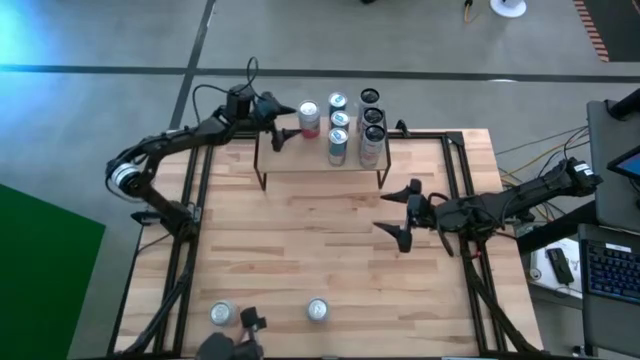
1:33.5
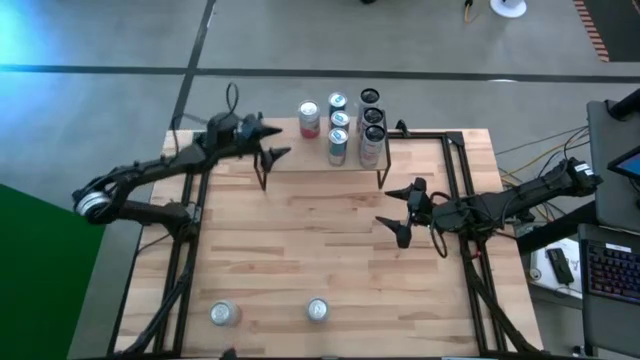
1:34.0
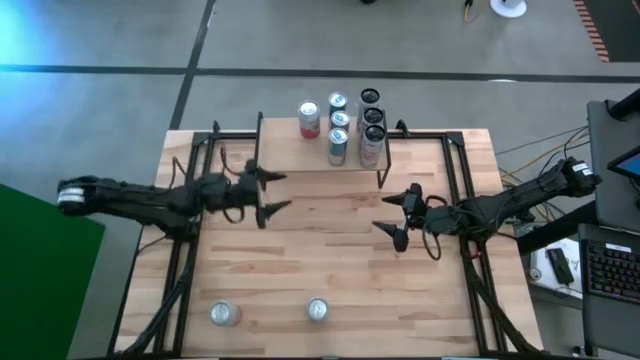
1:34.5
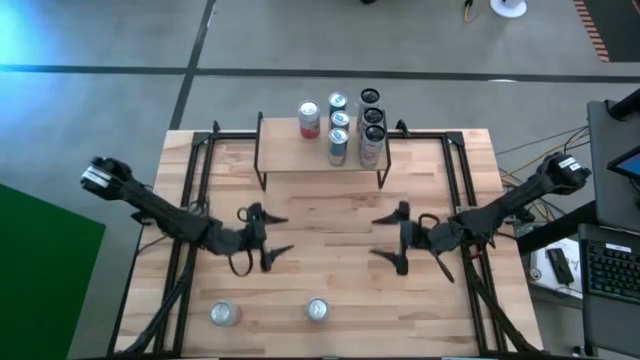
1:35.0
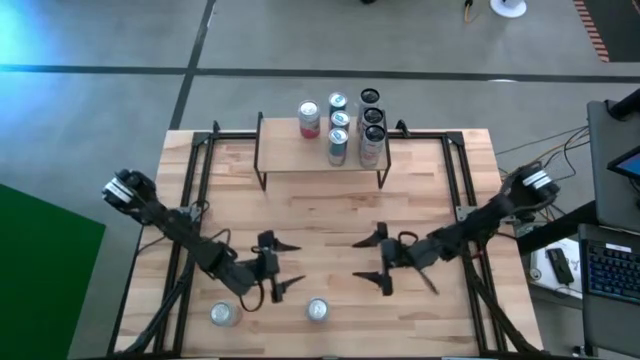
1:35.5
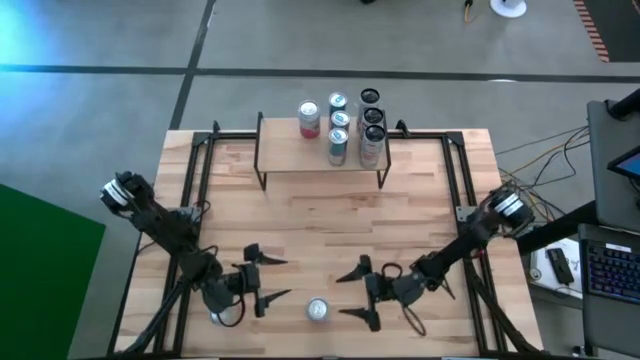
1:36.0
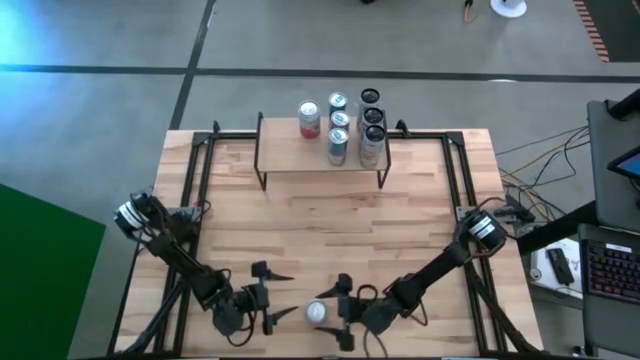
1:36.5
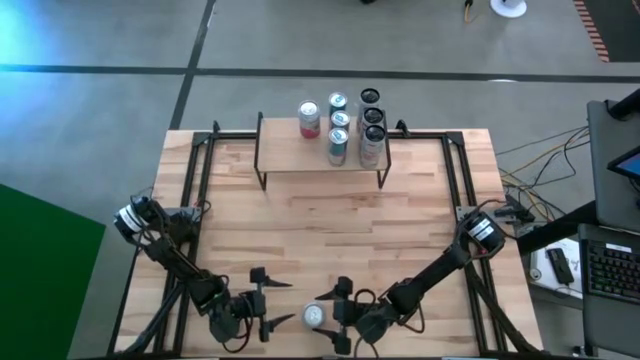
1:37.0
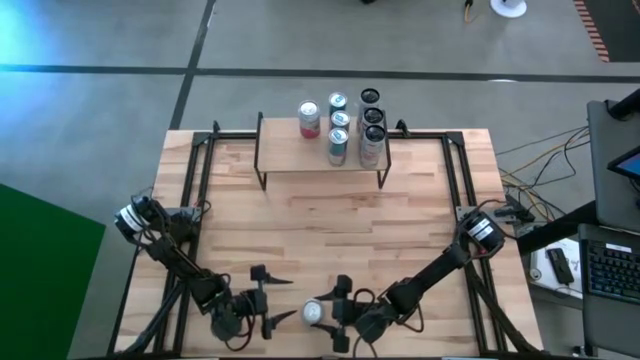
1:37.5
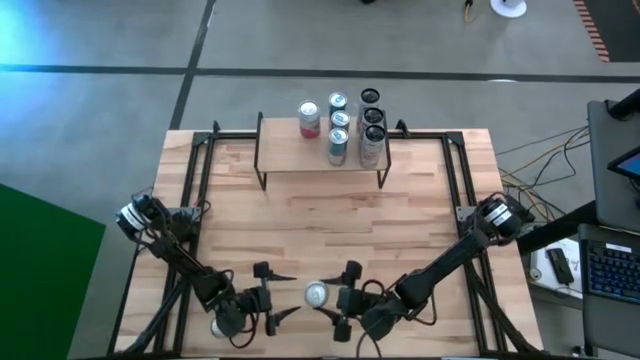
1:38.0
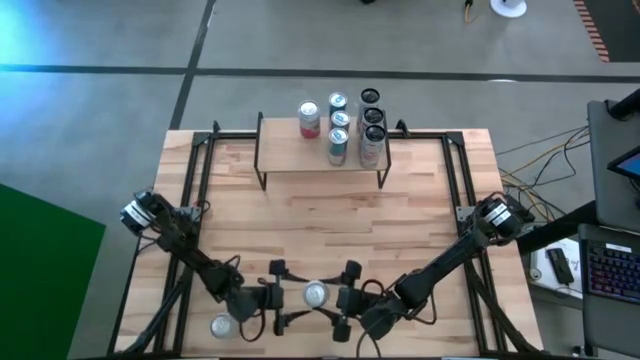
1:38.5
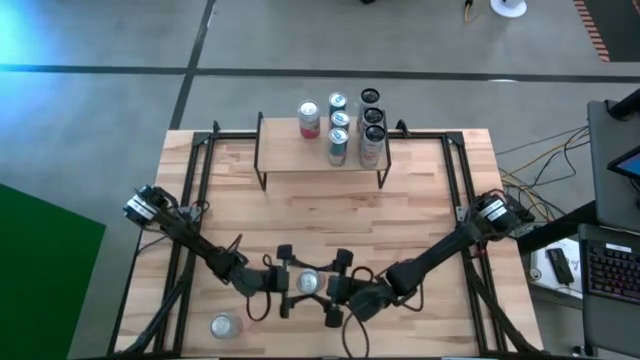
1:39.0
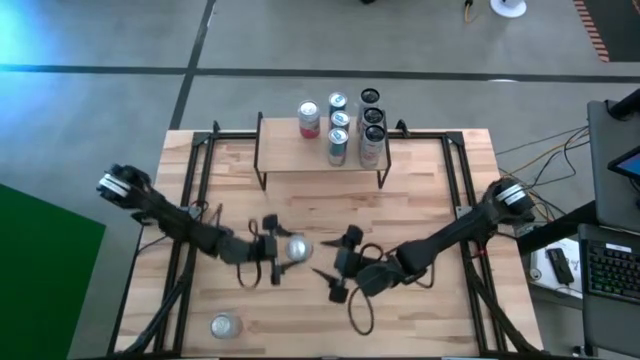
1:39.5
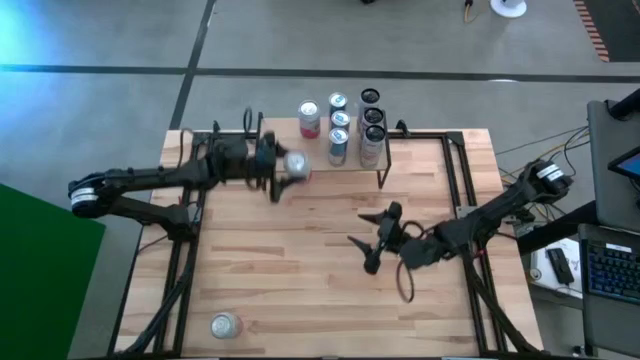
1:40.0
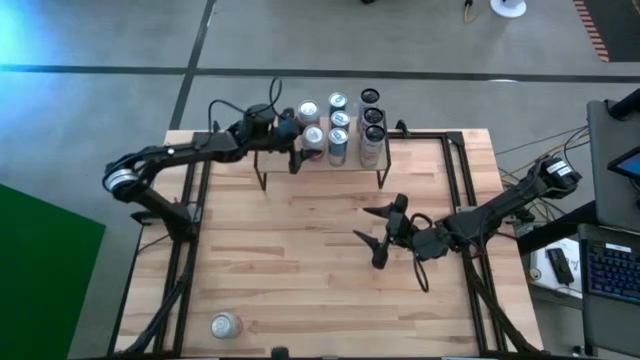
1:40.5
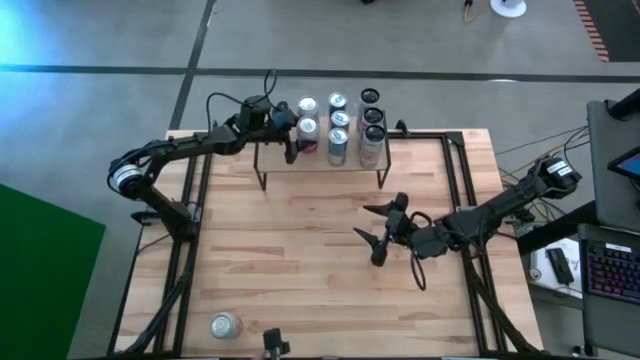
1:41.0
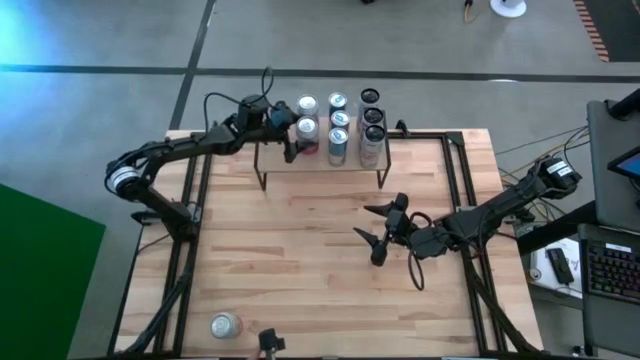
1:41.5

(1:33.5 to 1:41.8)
Task: Place canned beverage on shelf
Put the right pink soda can on the shelf aligned with the other pink soda can

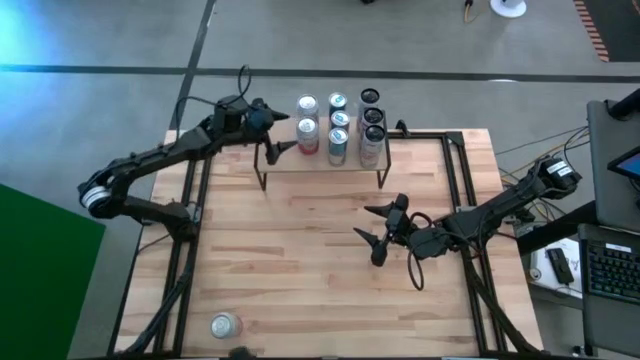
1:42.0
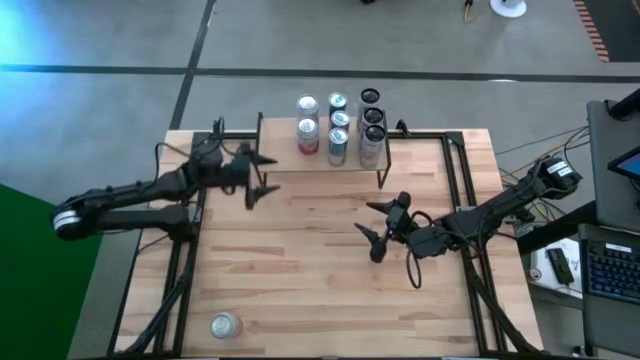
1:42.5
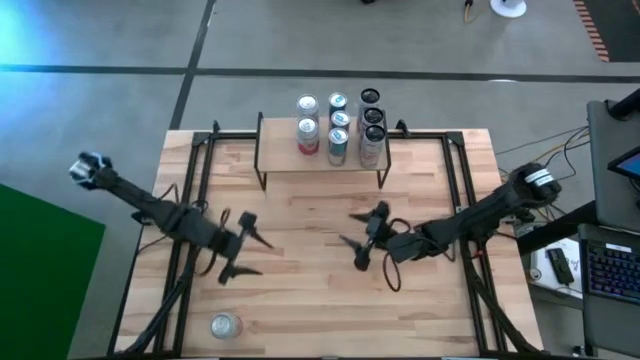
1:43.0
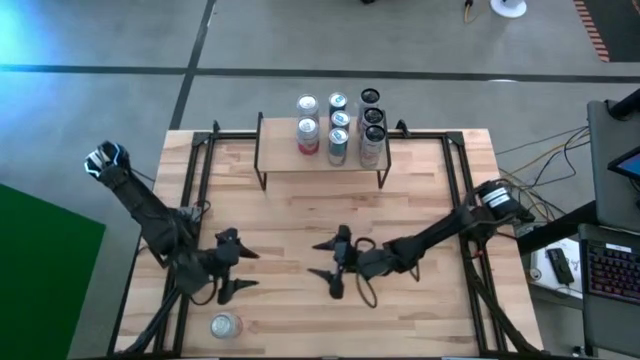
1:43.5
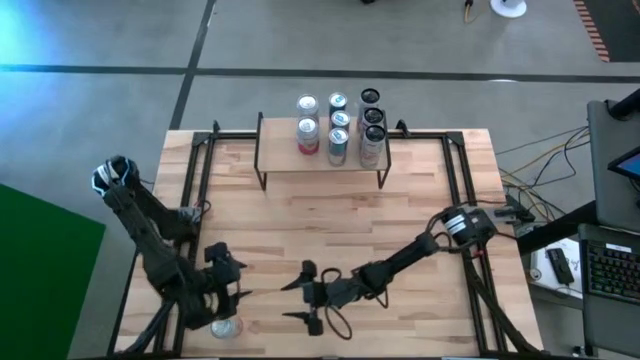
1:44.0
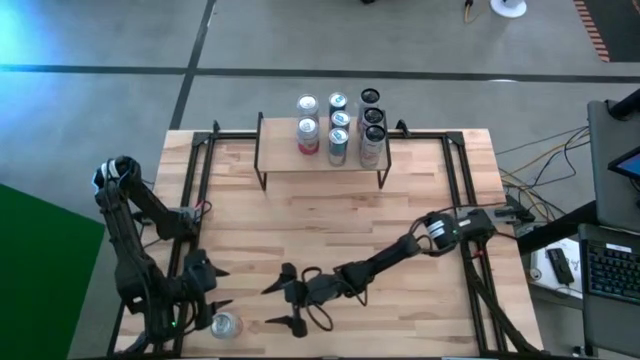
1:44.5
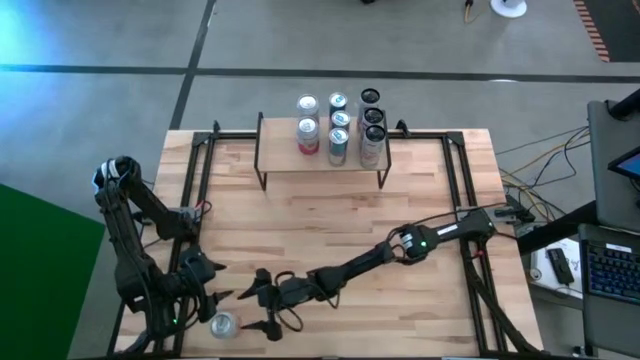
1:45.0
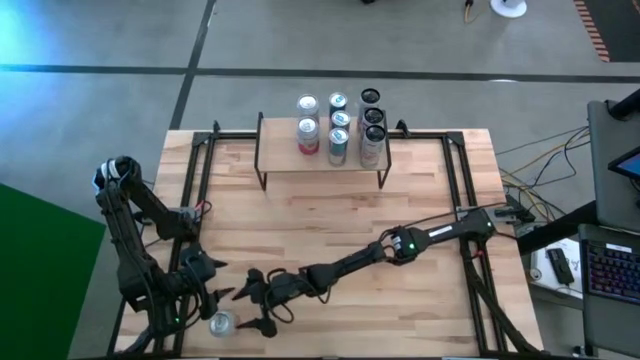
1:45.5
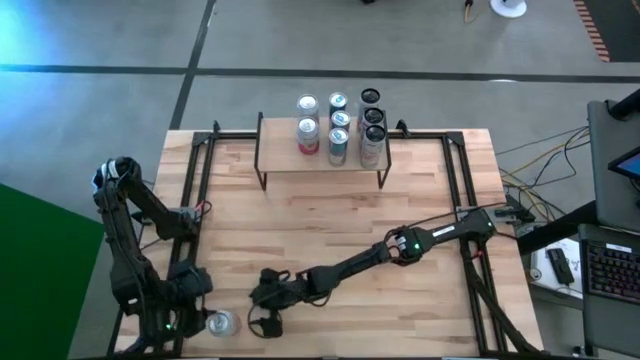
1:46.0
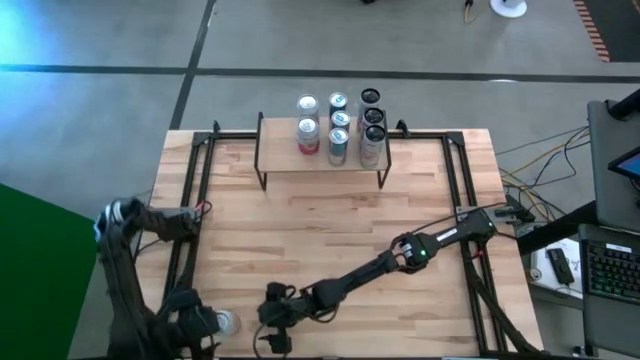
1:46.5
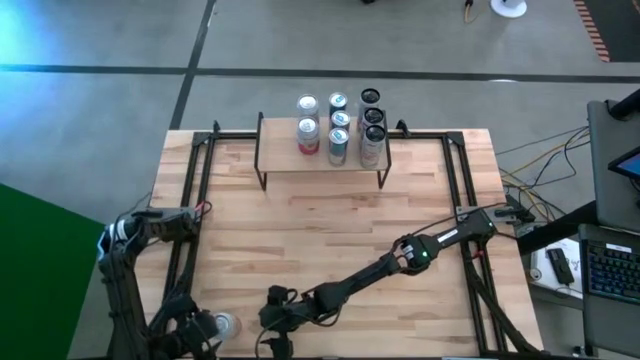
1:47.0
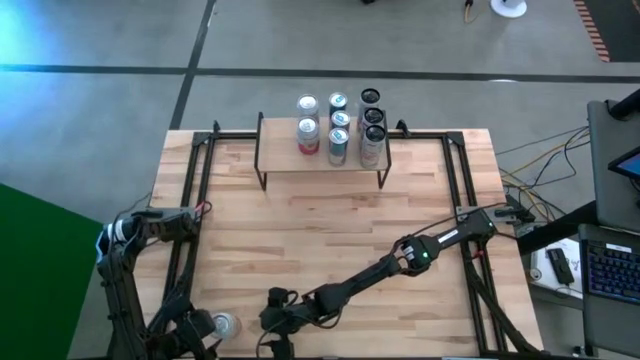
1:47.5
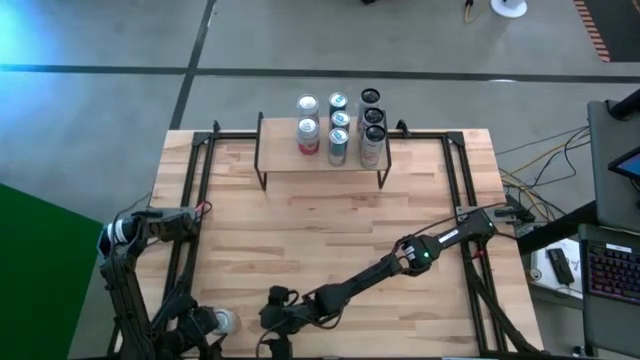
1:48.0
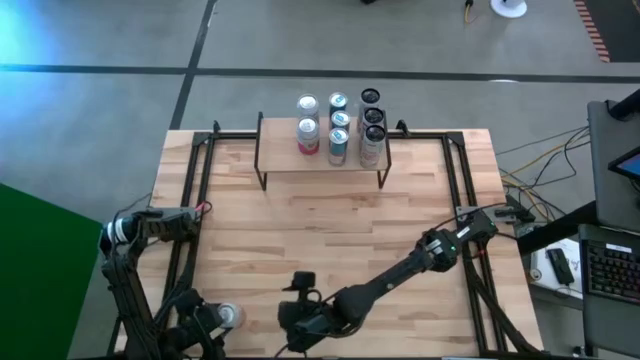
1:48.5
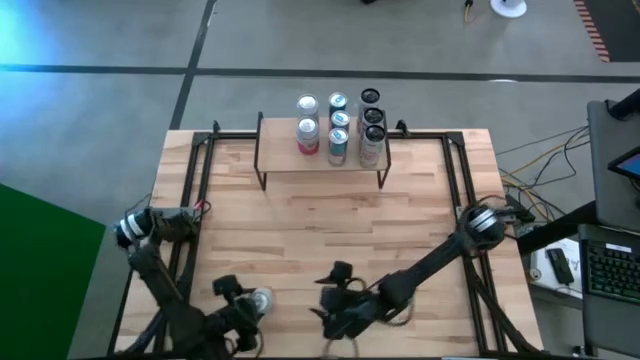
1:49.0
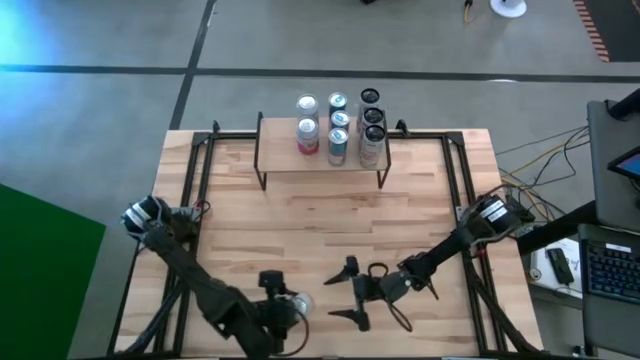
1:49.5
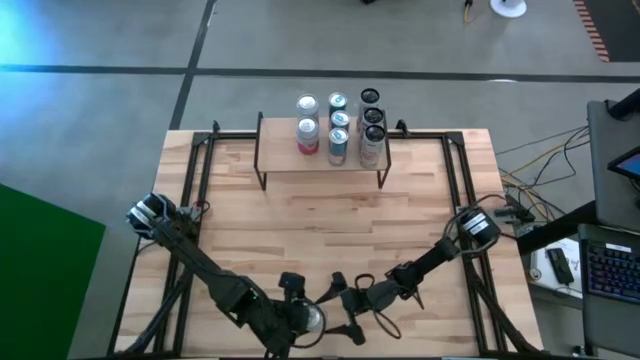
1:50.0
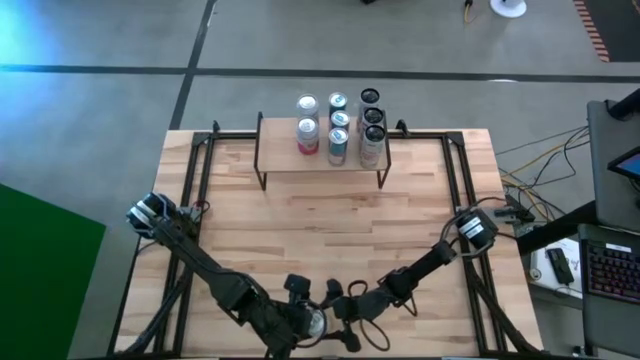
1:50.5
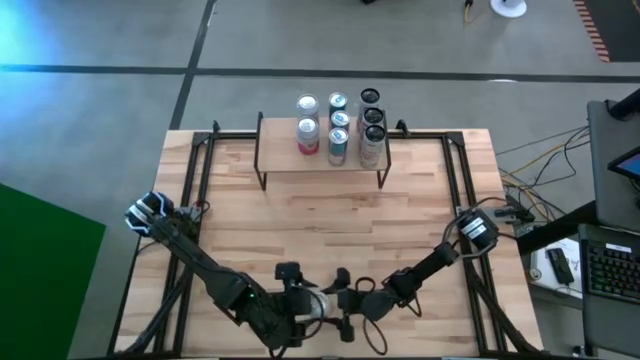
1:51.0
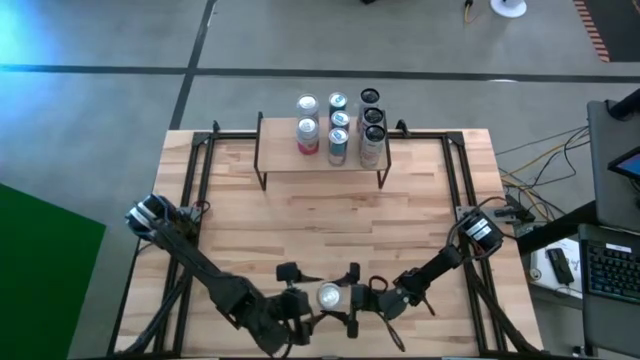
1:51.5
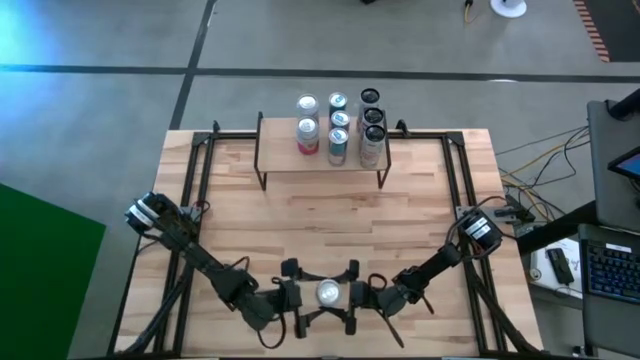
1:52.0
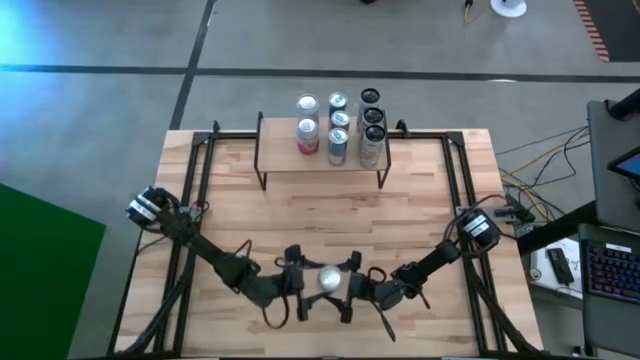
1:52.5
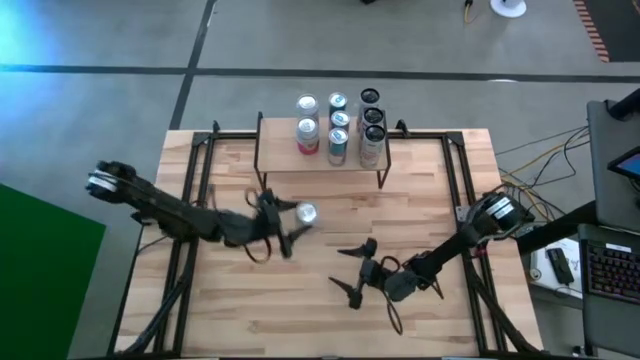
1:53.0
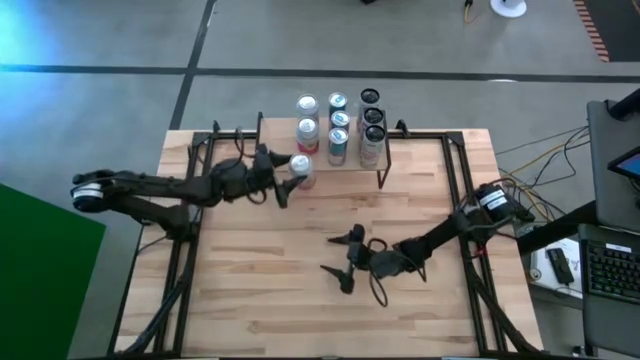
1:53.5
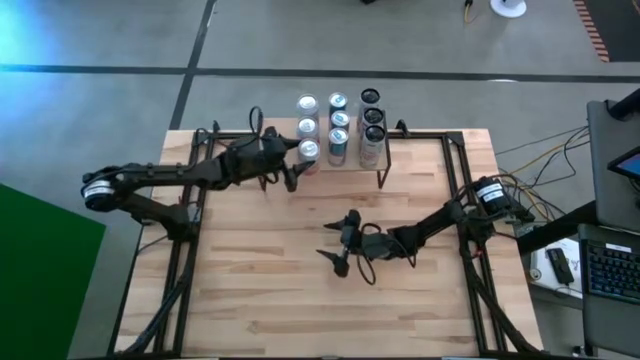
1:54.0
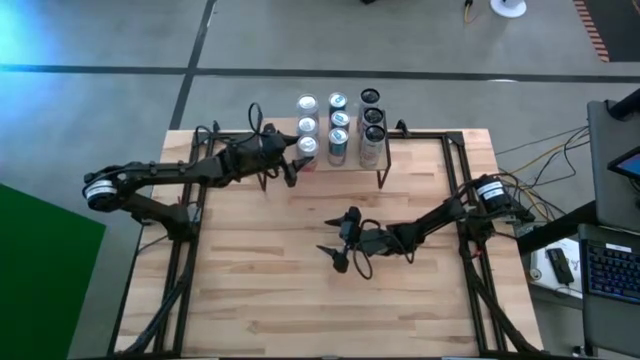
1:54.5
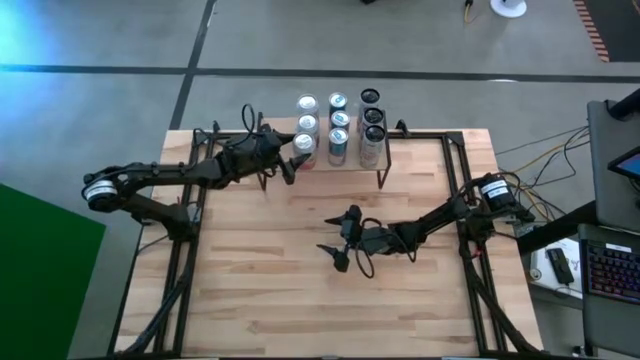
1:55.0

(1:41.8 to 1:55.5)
Put the pink soda can on the shelf aligned with the other pink soda can
